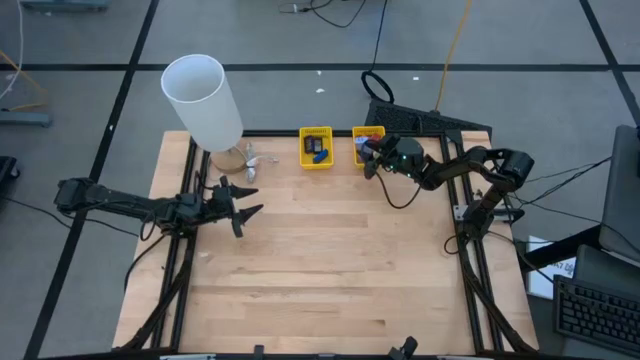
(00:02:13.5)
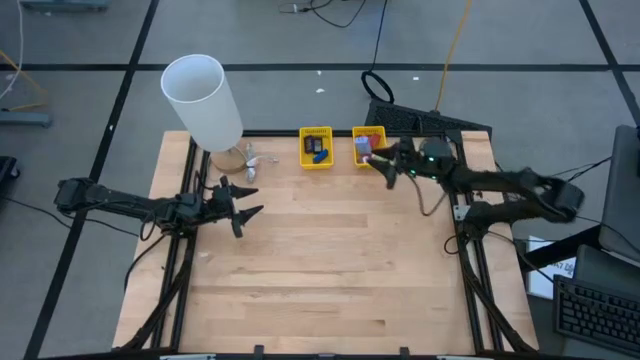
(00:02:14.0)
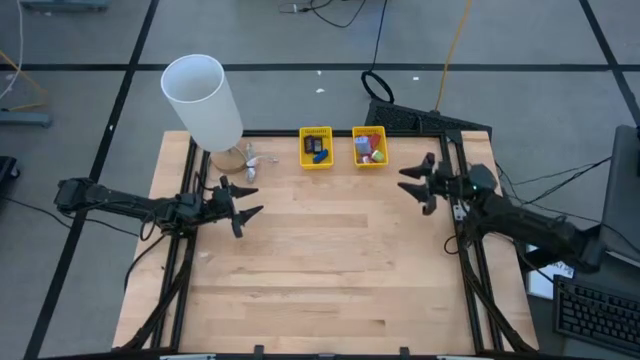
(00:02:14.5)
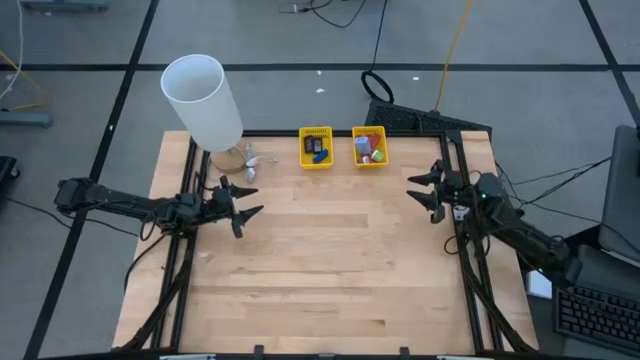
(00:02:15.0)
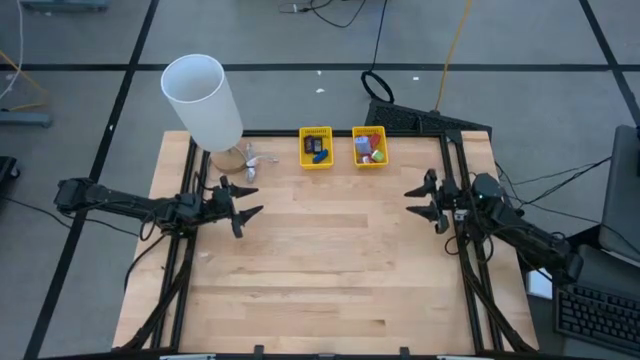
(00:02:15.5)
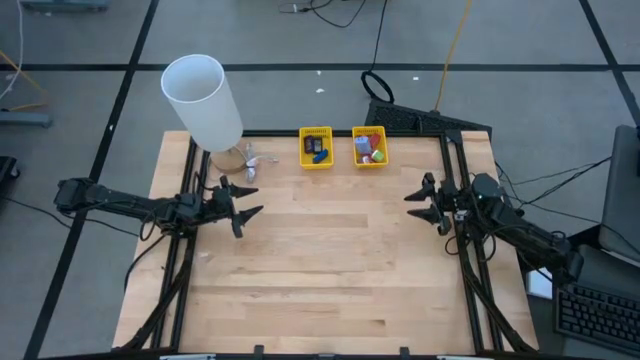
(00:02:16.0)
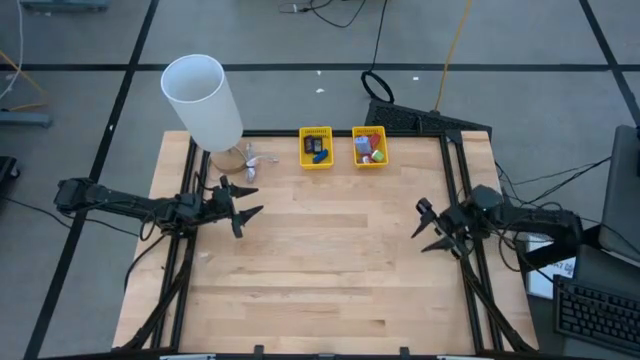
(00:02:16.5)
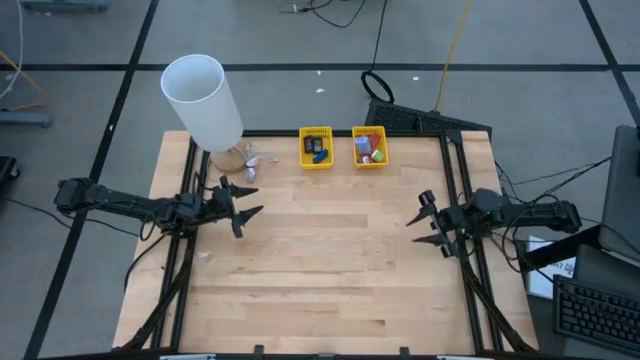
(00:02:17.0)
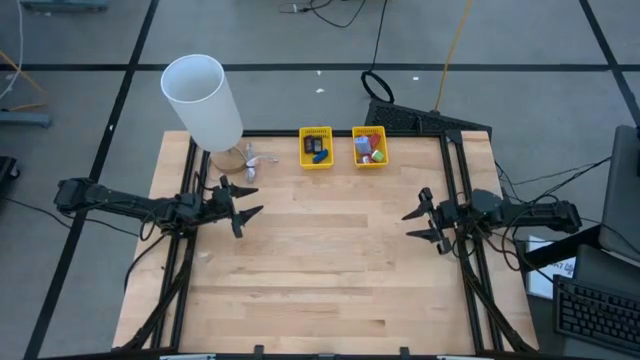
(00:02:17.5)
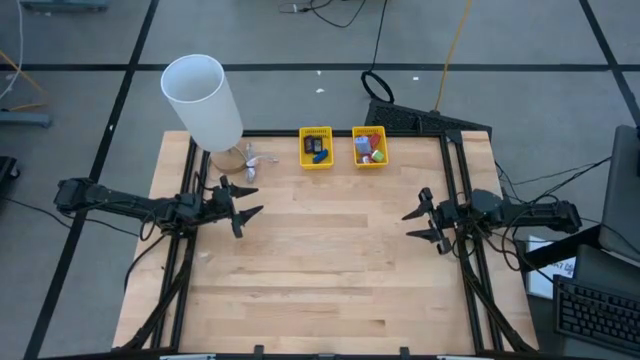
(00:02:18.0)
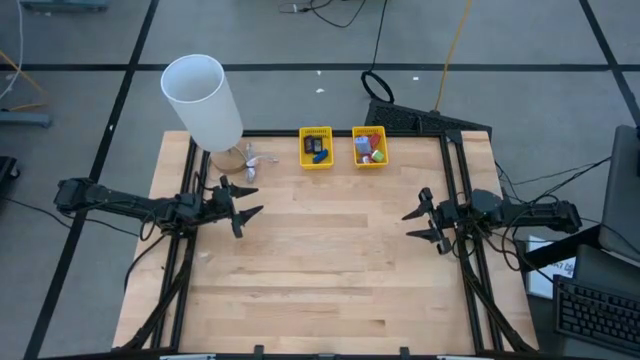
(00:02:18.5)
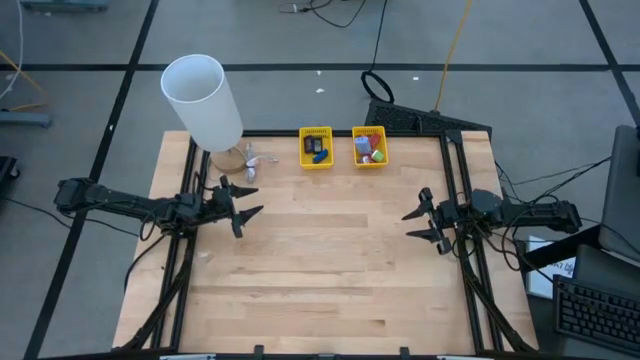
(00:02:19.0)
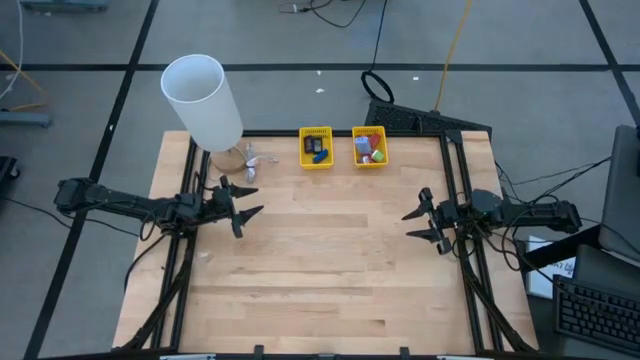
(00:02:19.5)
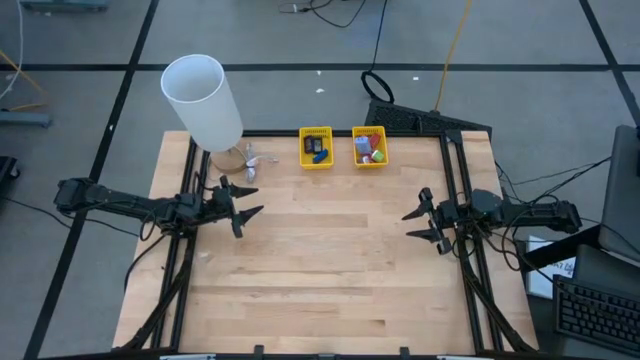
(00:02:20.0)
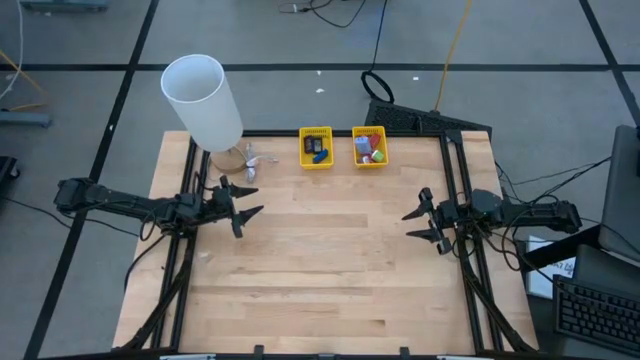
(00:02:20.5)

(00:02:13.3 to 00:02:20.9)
Task: Pick & Place Office items
Return To Home Position

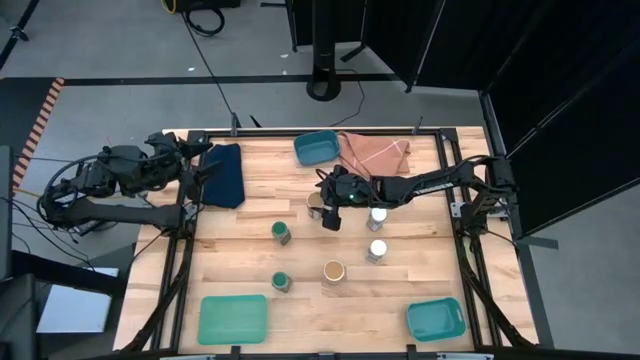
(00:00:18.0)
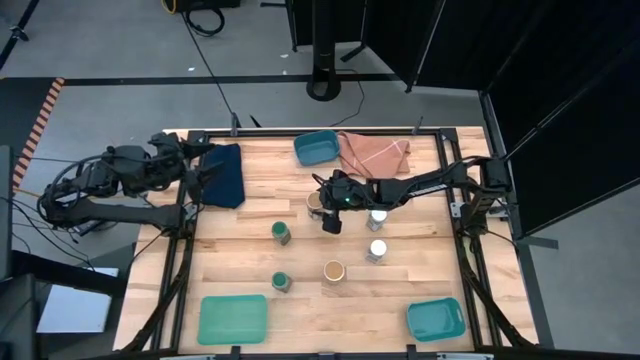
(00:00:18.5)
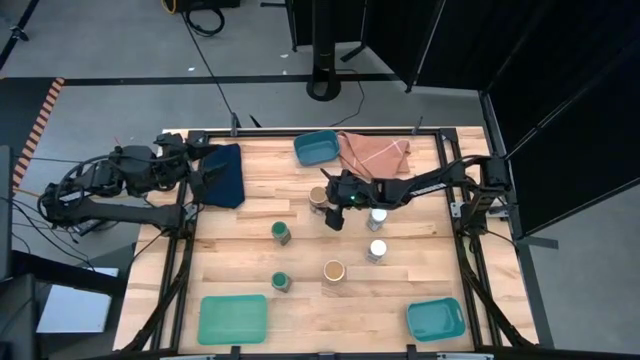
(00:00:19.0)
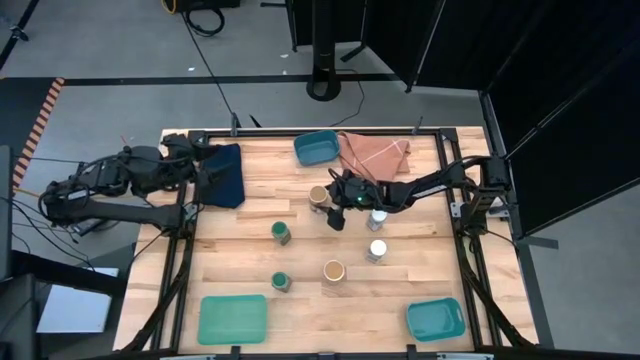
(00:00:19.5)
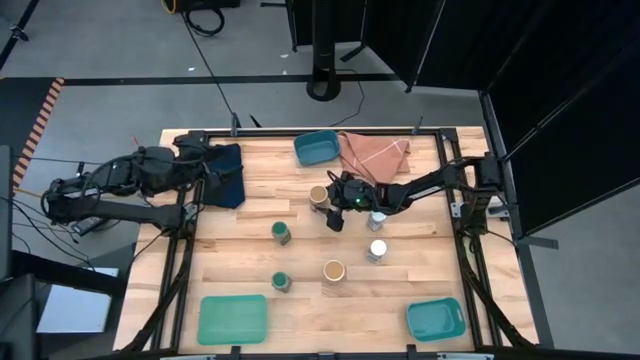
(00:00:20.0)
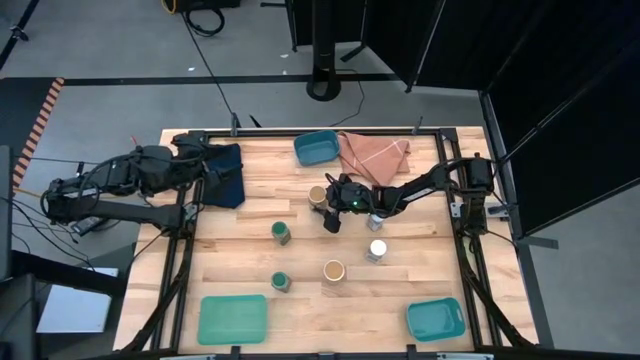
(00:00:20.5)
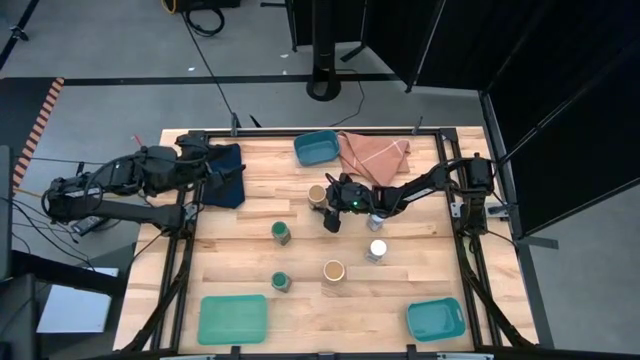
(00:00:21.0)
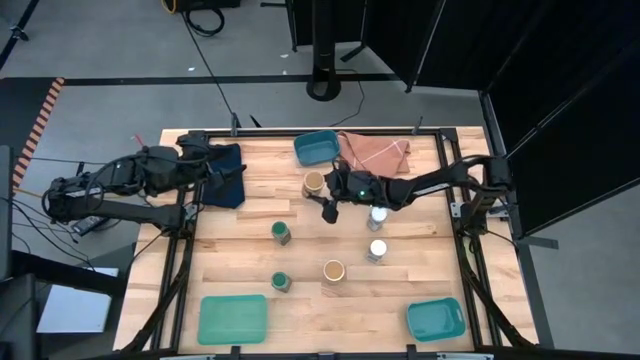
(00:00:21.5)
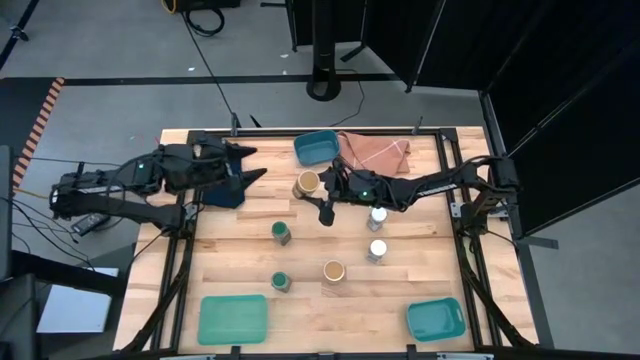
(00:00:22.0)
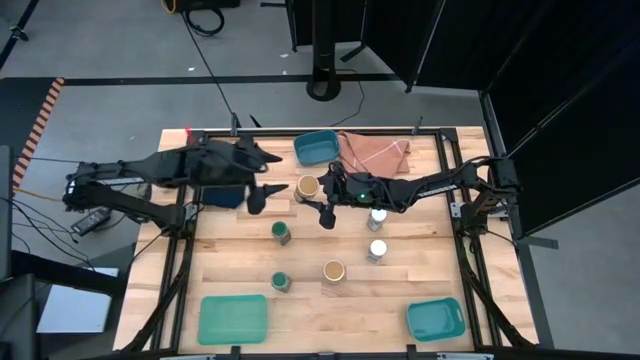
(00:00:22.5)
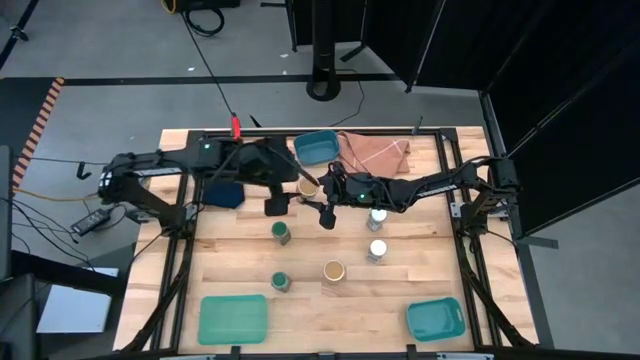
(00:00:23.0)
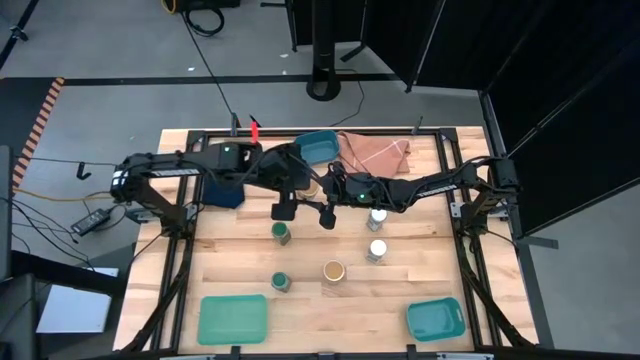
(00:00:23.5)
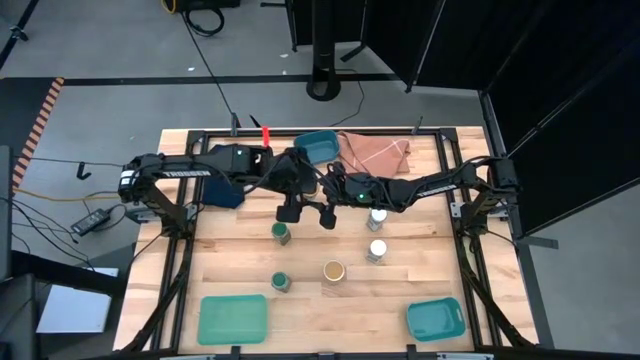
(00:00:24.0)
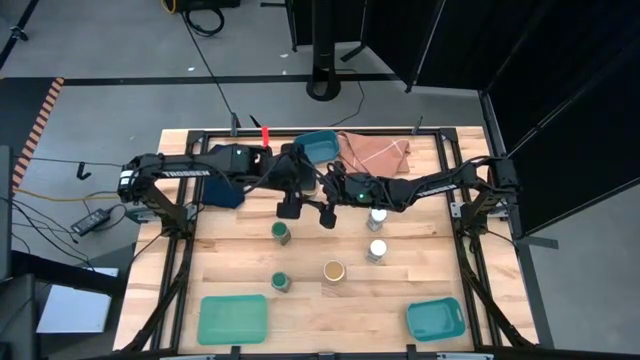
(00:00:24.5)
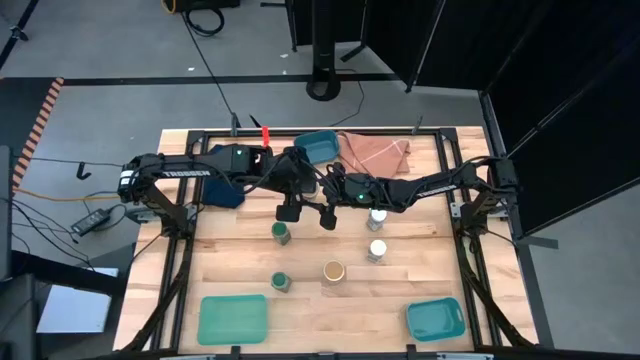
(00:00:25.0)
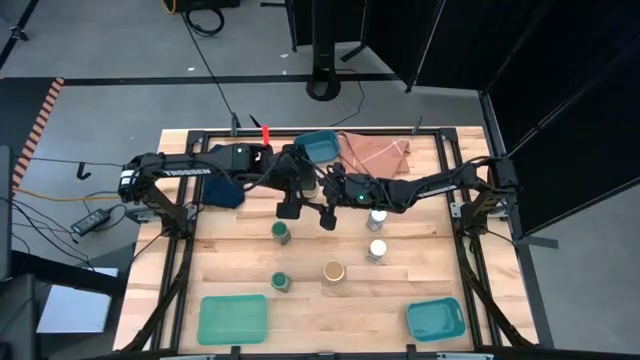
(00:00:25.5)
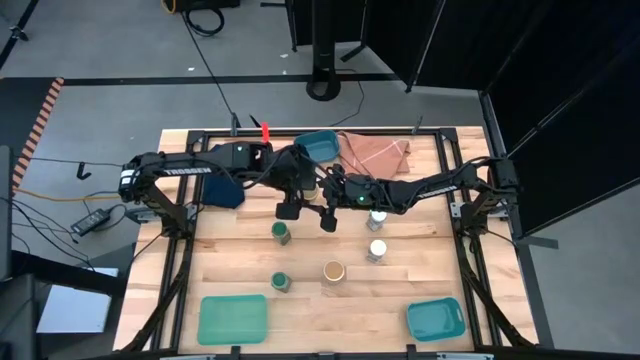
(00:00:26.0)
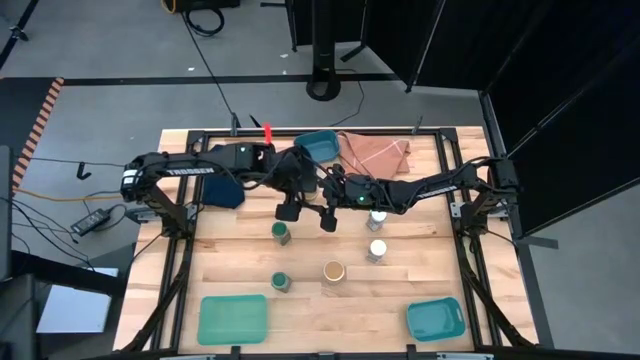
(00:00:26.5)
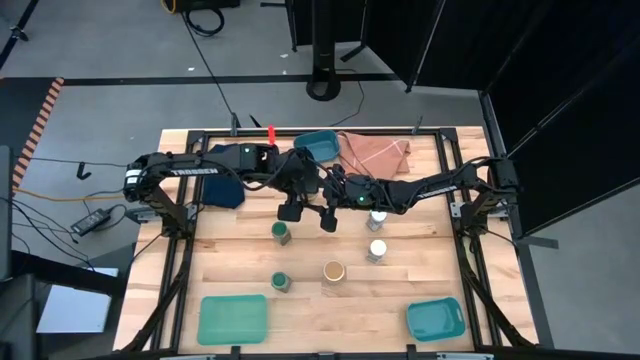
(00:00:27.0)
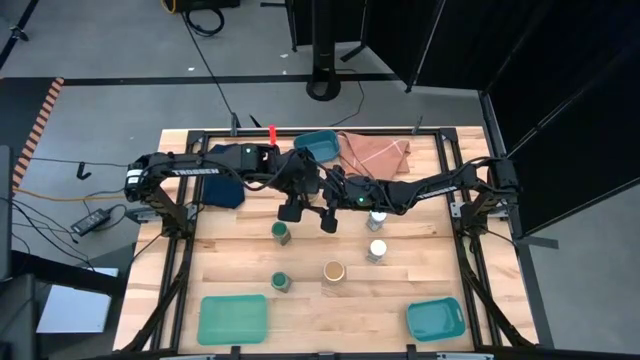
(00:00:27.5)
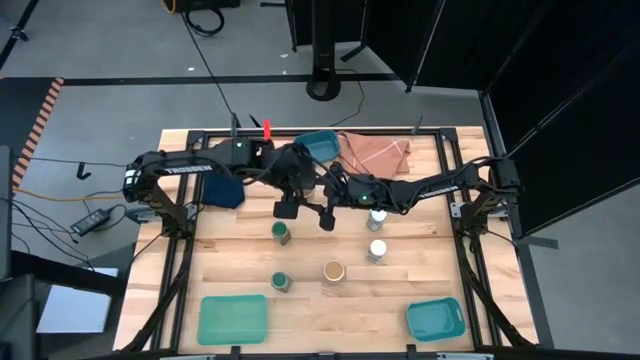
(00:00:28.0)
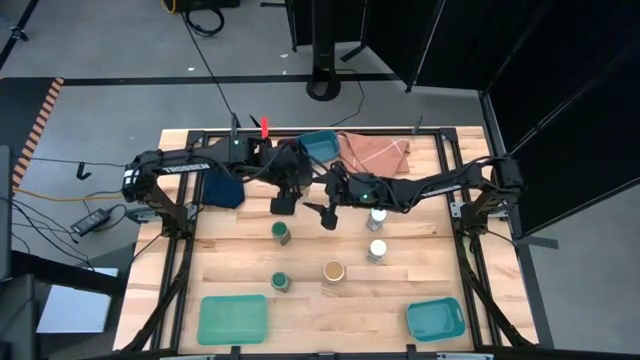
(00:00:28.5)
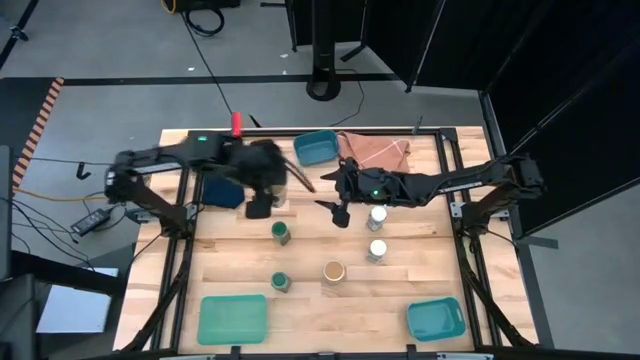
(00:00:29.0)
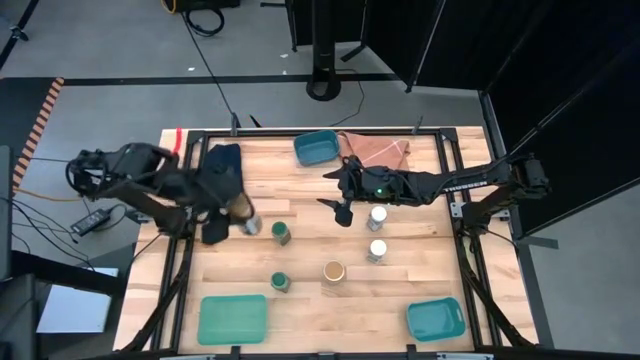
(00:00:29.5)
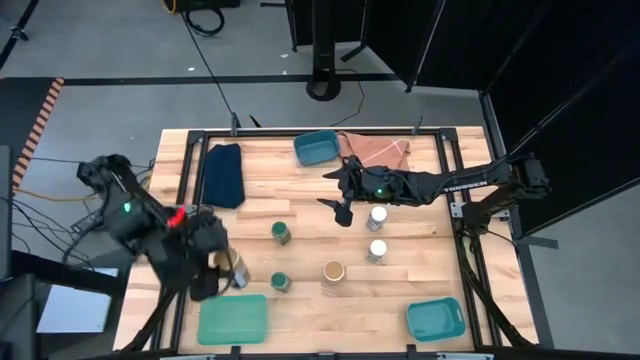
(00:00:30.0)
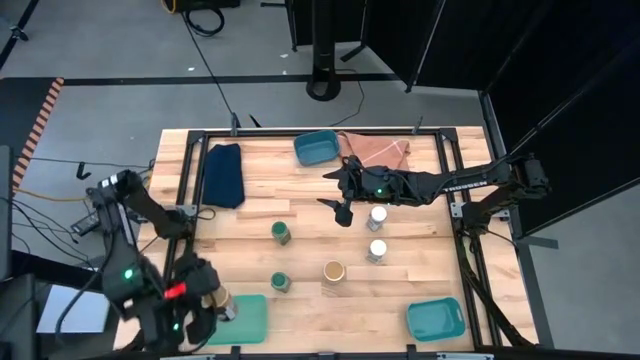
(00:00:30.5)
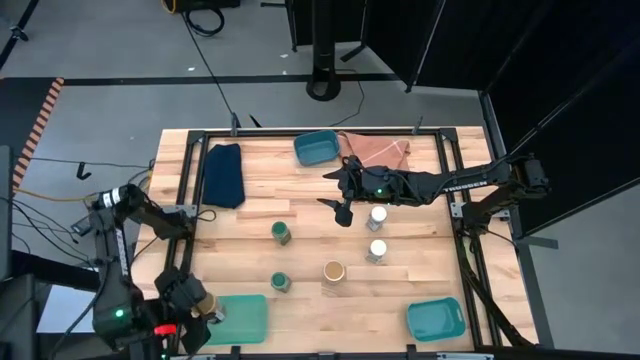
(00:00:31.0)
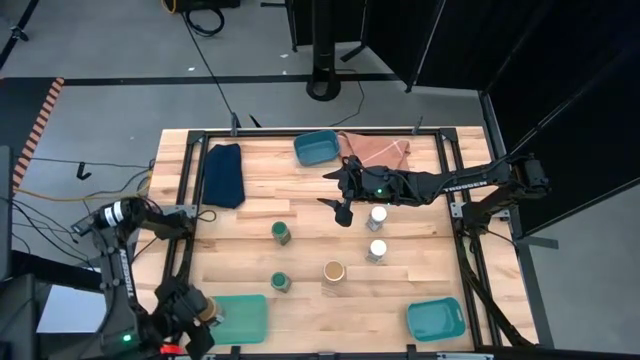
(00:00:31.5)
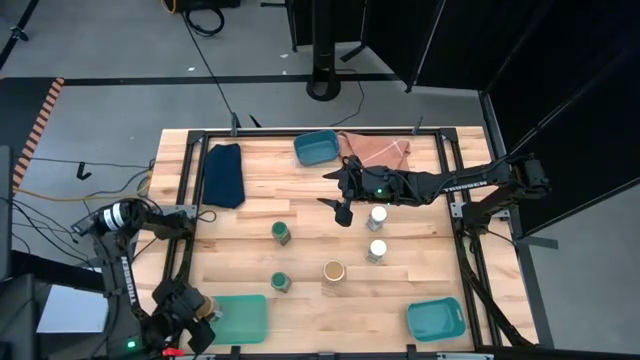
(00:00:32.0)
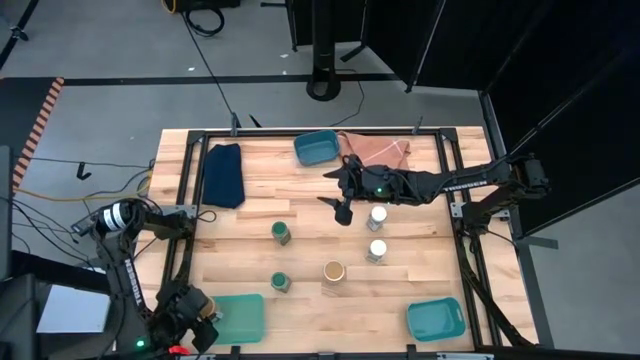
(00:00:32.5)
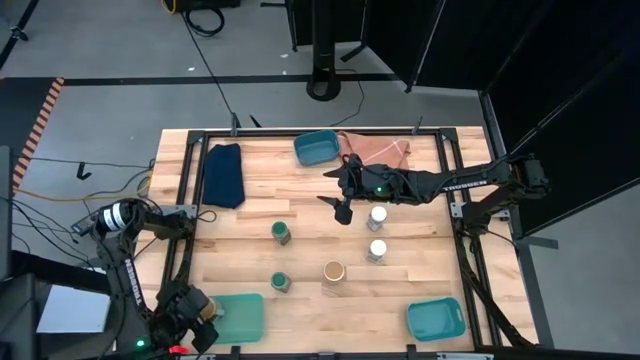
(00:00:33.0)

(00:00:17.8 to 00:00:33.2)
Task: Sort spices by type
Put the top brown seasoning bottle into the light green bin
